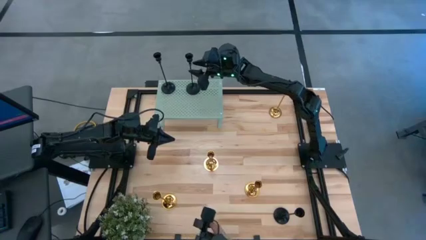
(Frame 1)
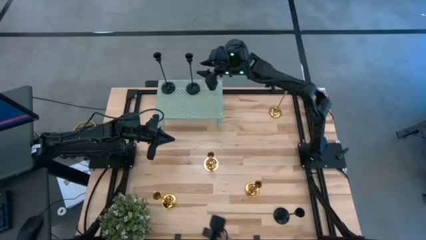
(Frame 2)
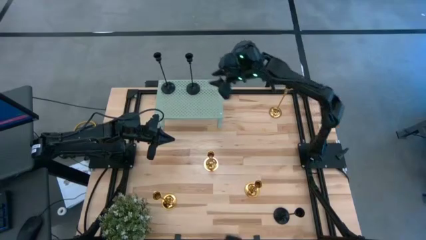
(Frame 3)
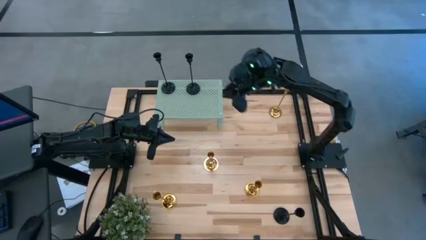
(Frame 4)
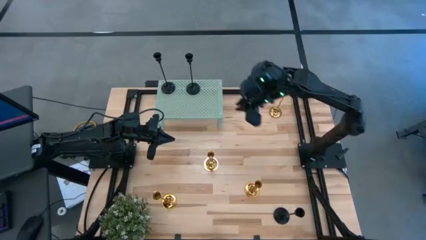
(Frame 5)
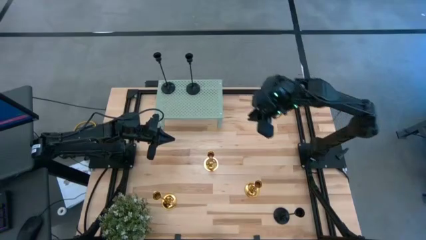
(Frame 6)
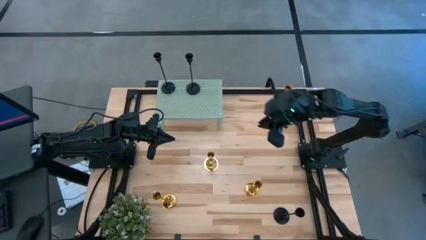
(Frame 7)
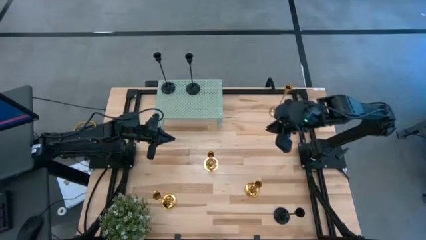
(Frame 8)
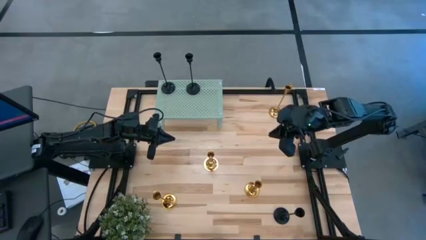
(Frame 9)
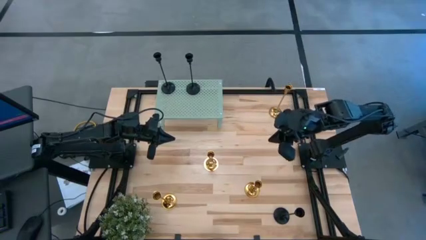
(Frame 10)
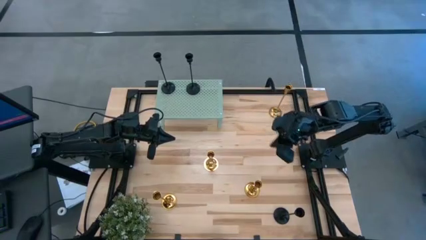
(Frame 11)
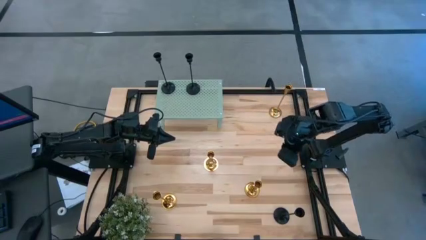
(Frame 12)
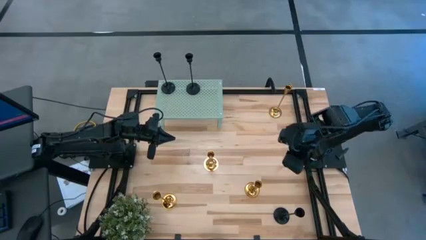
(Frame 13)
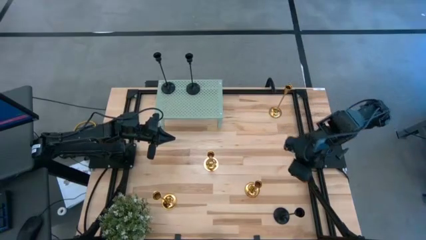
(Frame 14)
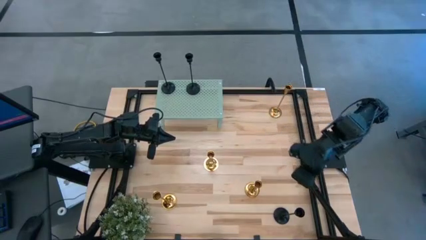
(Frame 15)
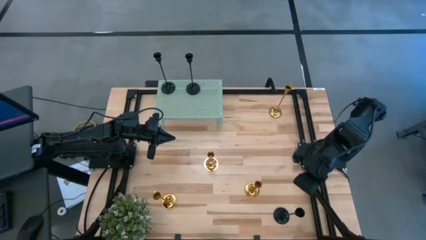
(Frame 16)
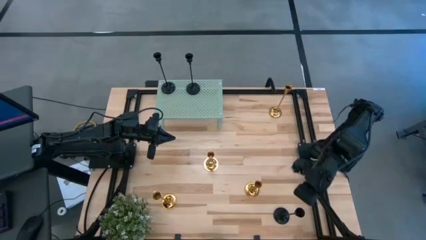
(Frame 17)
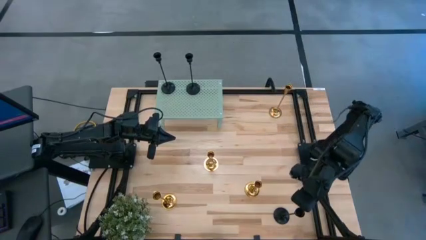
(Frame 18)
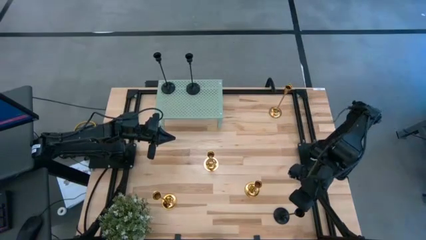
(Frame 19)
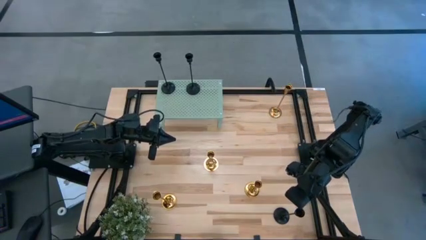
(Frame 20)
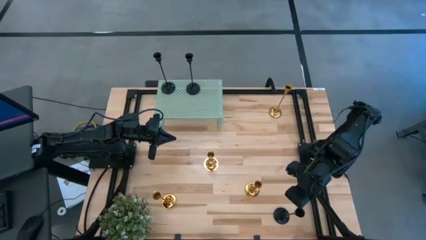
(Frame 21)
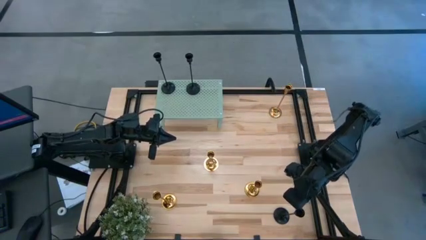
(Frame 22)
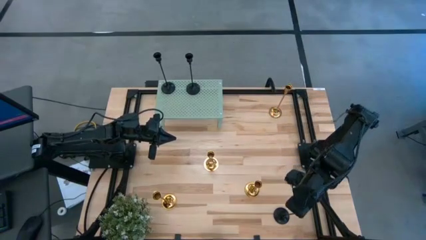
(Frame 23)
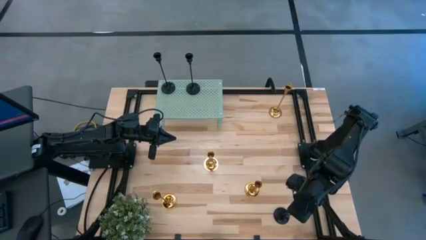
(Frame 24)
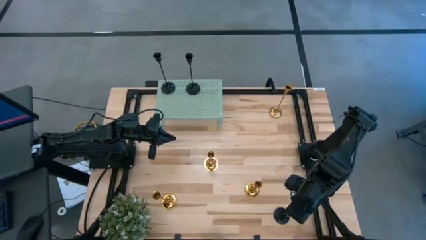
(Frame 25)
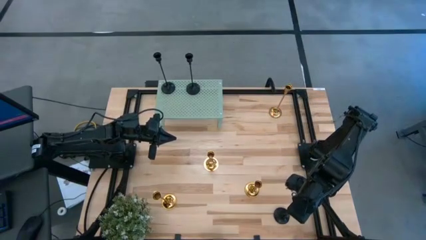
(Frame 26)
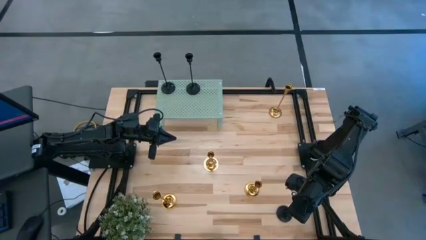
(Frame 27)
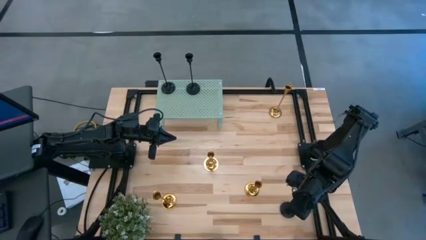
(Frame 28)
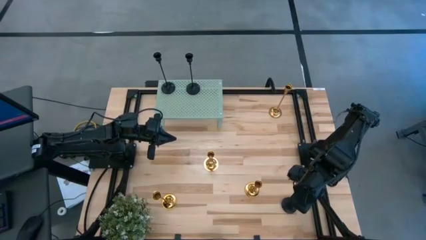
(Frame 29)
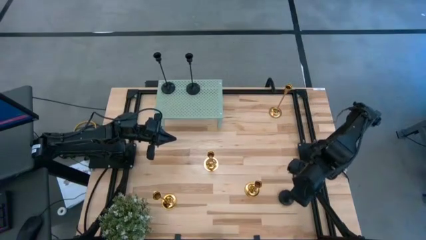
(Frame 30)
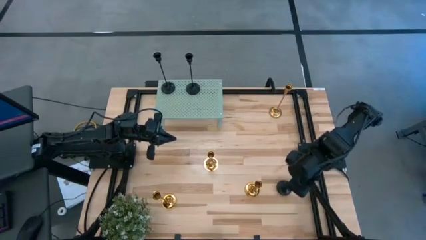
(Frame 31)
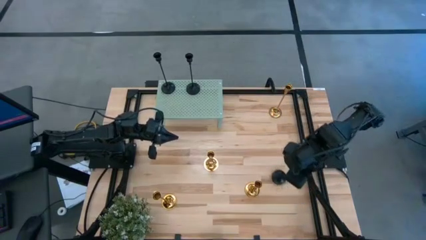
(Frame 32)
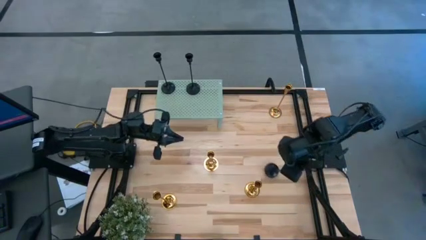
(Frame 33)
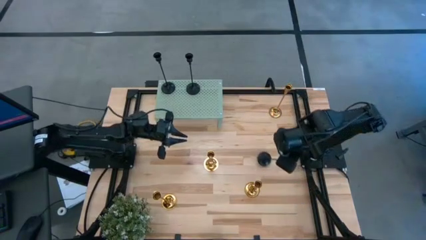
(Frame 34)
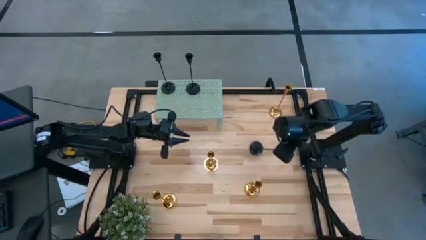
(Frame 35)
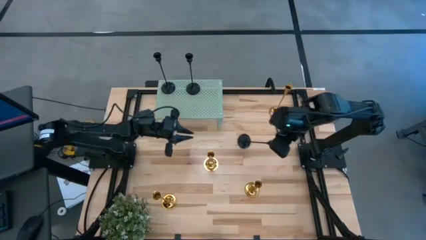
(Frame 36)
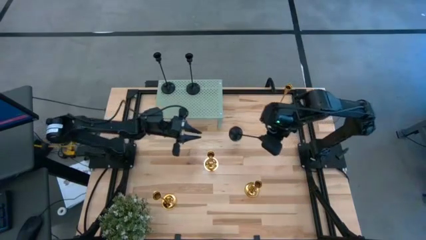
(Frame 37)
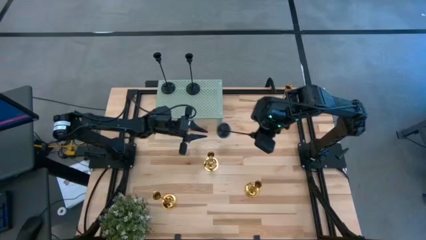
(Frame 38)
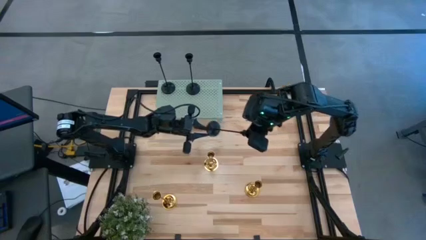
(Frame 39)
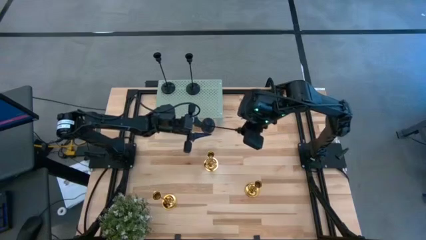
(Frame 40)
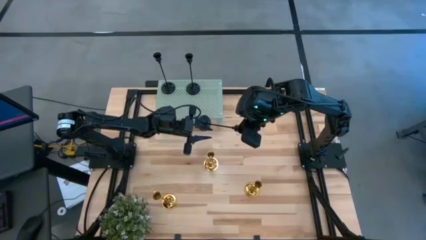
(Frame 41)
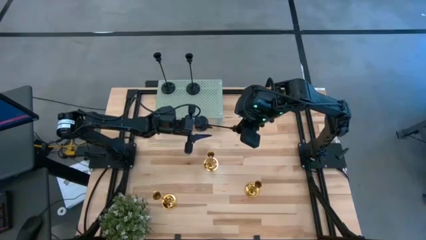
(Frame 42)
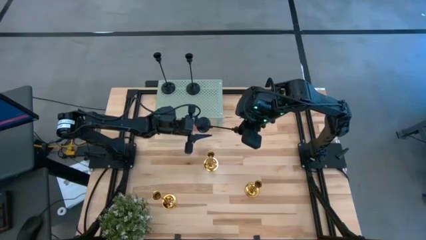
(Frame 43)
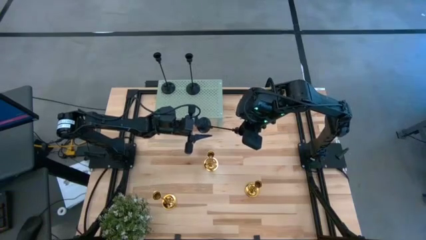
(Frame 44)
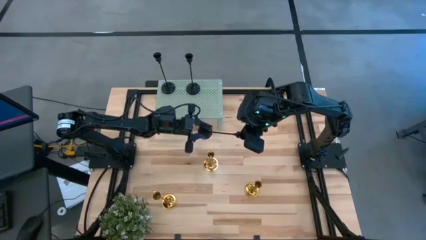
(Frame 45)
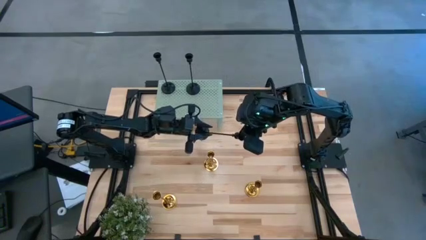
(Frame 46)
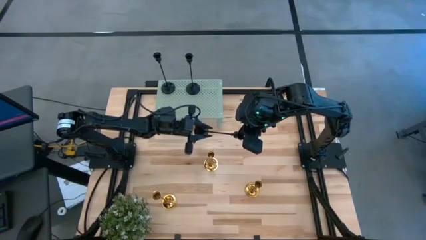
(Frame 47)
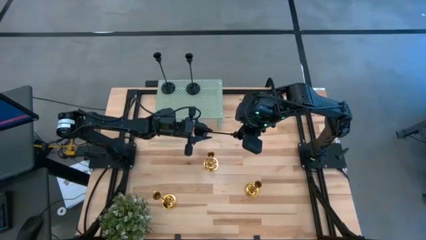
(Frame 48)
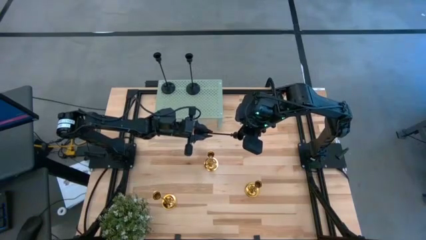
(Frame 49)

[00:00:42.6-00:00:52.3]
Task: Pick & Place candle stick holders
Put the black candle holder on the shelf

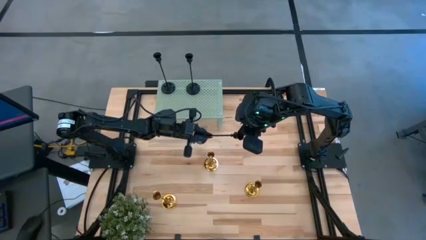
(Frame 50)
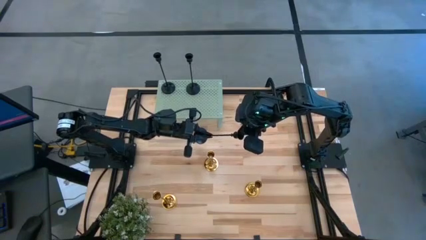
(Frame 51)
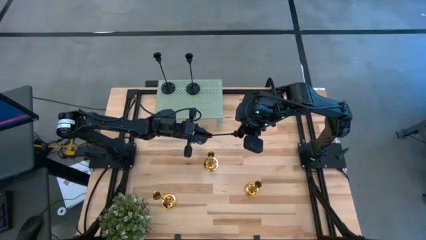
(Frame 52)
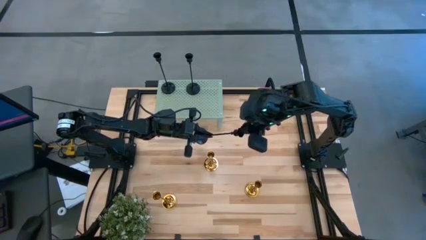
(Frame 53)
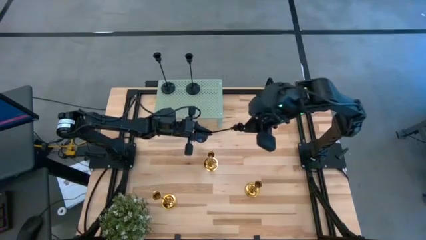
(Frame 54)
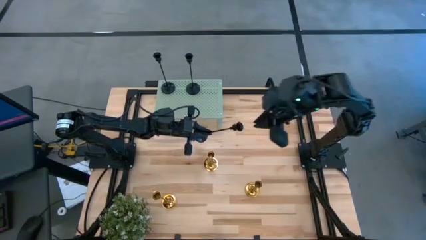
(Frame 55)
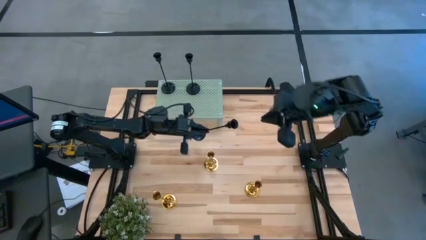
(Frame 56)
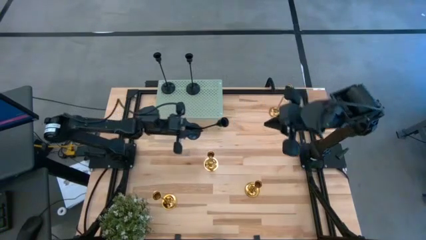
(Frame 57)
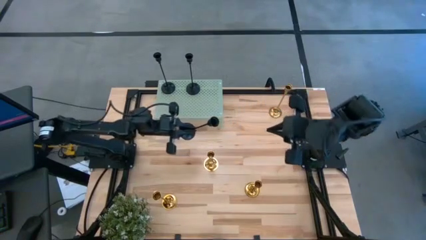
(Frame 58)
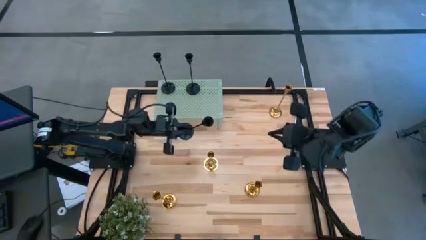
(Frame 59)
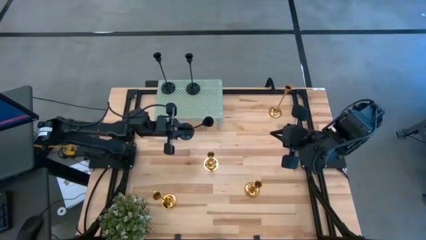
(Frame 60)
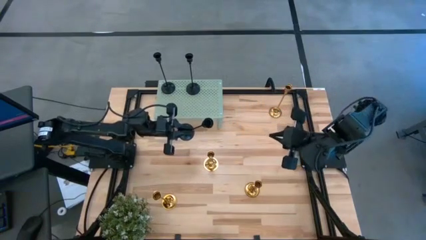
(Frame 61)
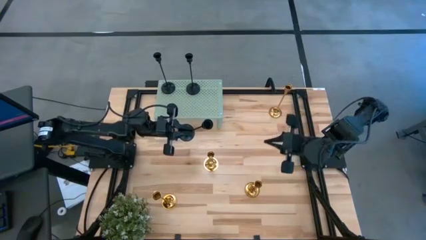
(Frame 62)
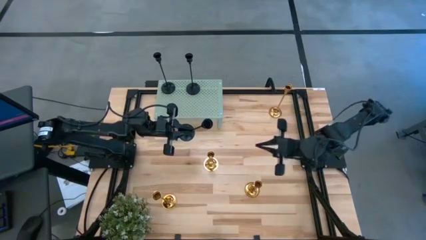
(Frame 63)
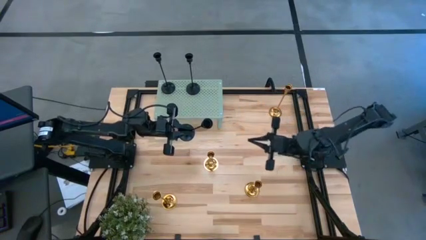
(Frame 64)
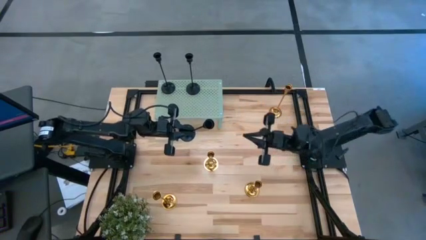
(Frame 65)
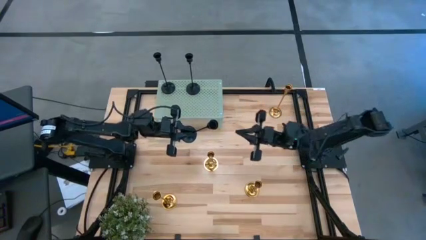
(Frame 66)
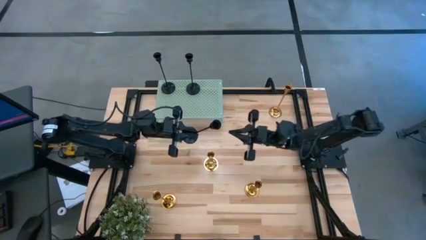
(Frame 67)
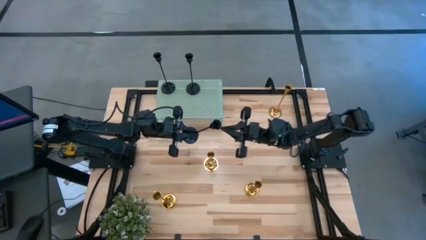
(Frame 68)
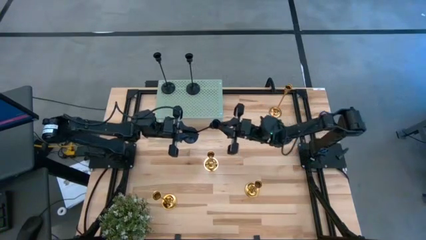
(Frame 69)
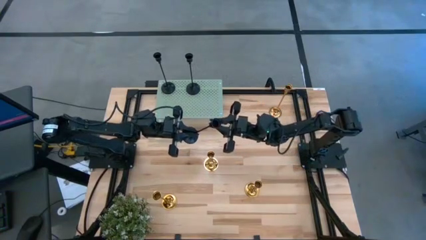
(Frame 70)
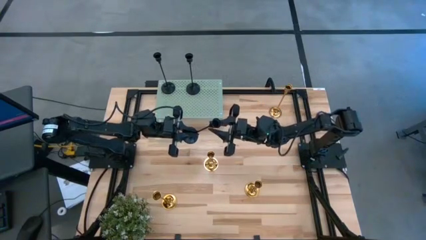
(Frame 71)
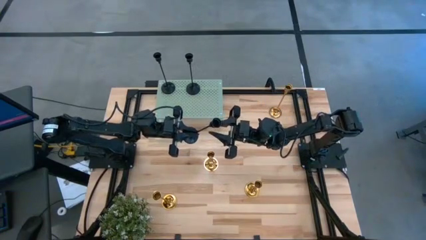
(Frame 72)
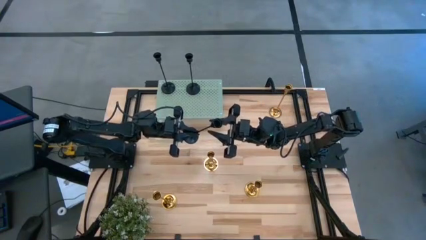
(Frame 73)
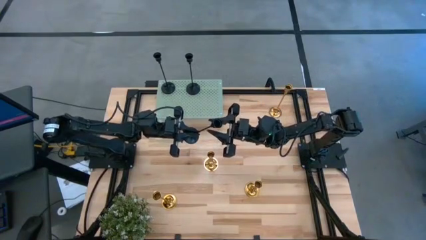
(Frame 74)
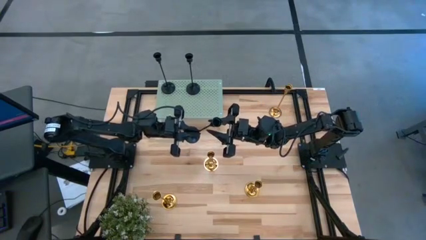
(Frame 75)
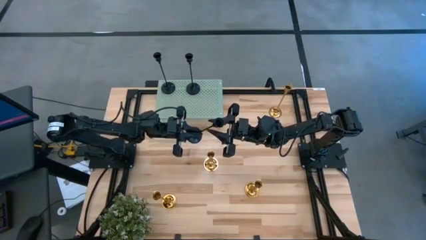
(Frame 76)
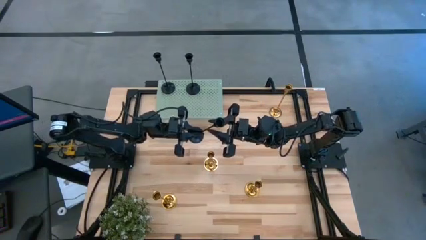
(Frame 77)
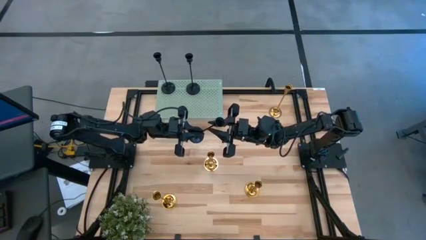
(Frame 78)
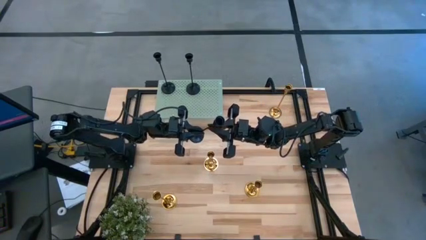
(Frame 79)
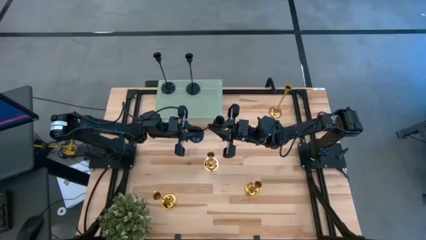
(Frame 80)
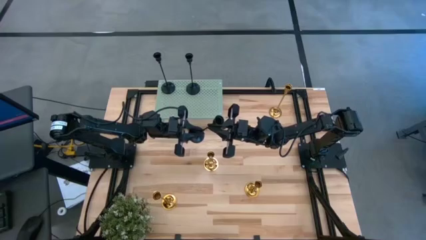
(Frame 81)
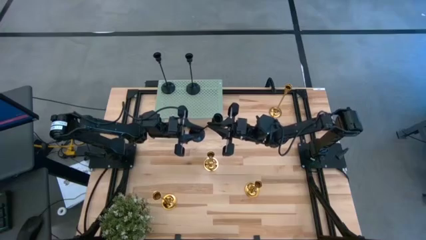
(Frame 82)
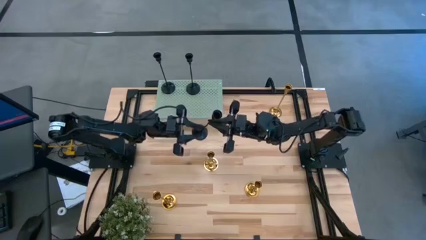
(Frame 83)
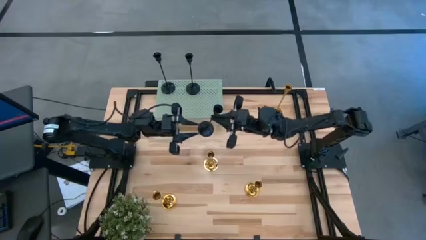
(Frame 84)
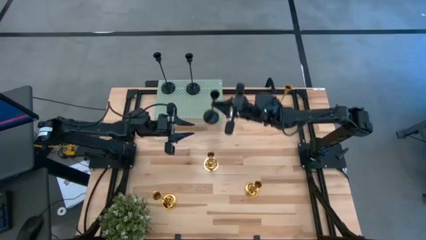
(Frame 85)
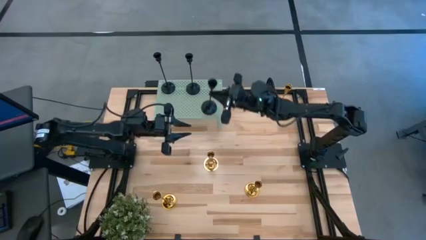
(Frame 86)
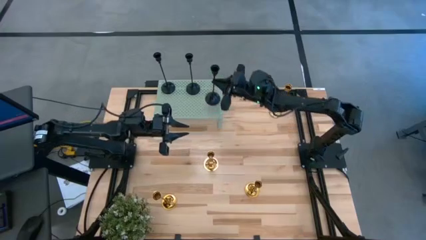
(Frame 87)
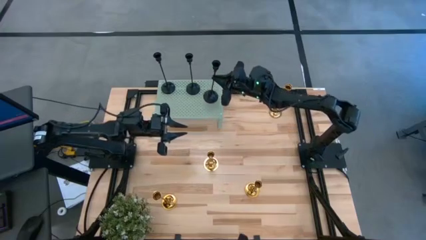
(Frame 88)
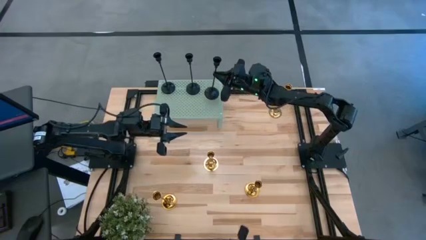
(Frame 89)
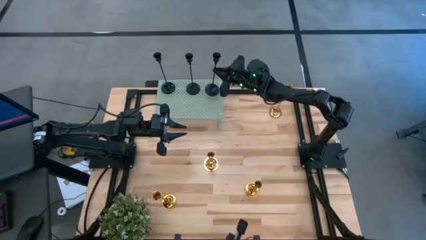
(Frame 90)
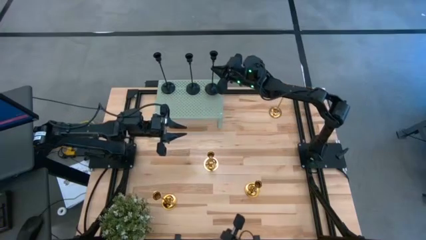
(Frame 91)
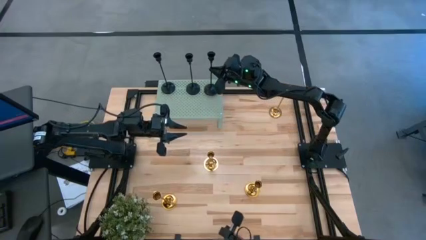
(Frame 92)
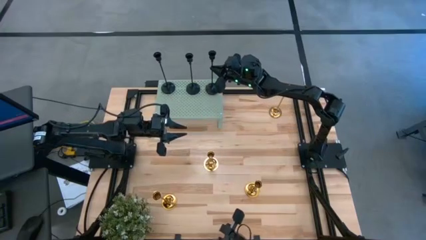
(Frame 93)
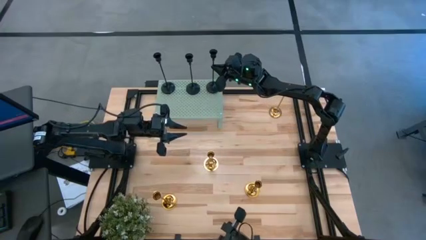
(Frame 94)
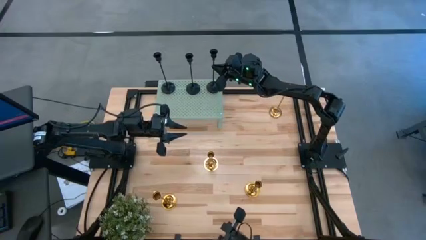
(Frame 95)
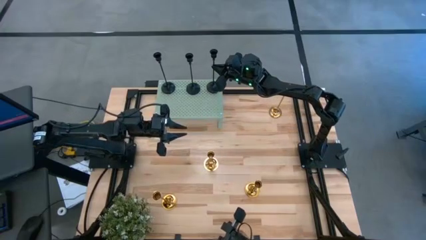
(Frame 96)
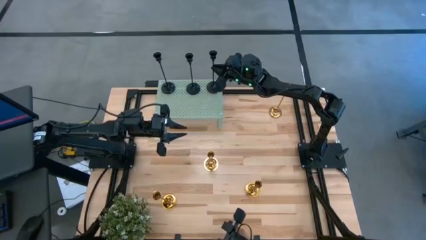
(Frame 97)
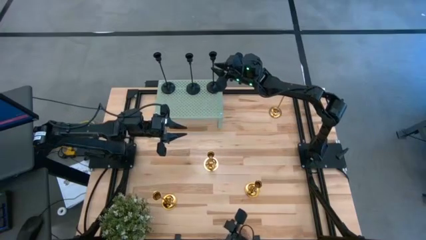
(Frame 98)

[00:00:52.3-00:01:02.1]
Put the black candle holder on the shelf
